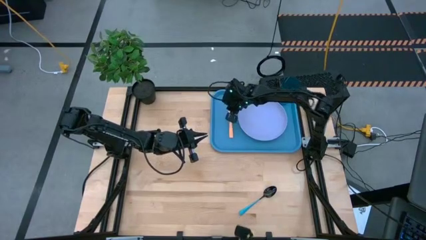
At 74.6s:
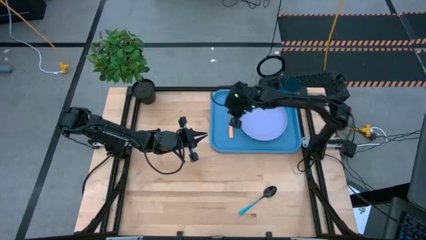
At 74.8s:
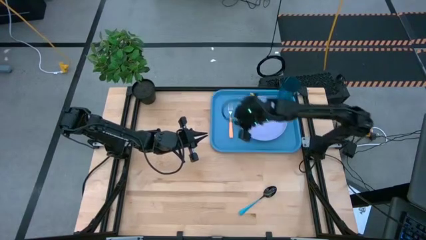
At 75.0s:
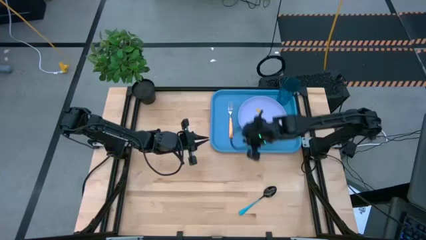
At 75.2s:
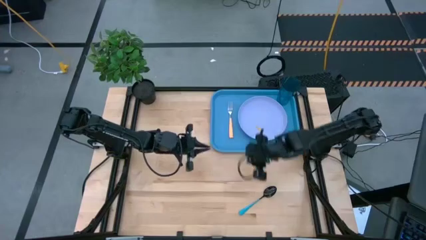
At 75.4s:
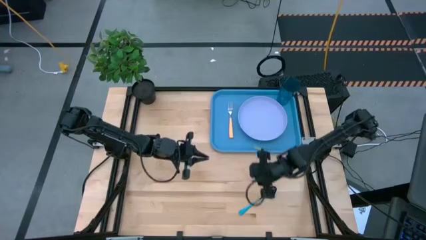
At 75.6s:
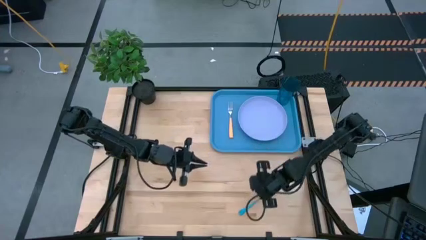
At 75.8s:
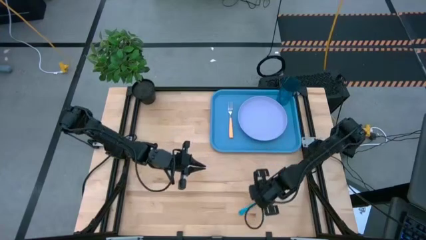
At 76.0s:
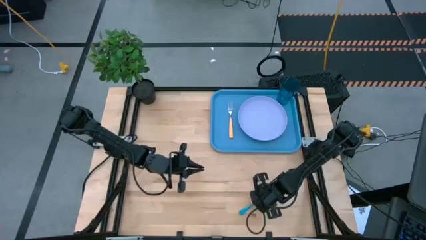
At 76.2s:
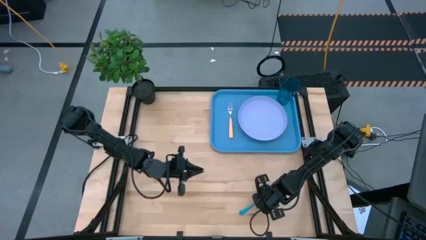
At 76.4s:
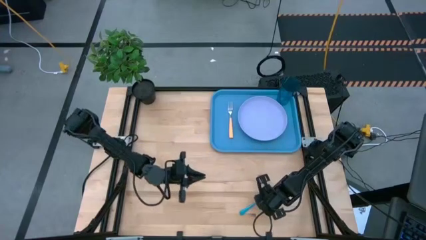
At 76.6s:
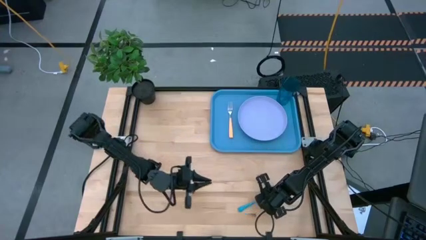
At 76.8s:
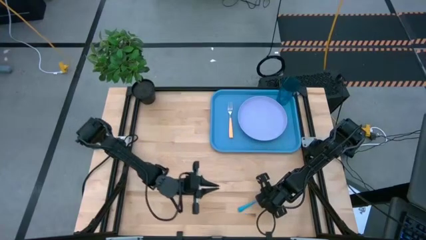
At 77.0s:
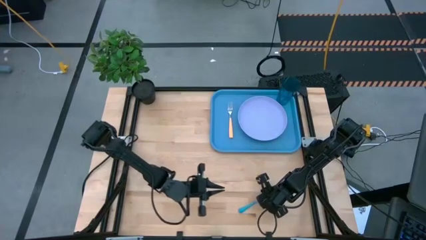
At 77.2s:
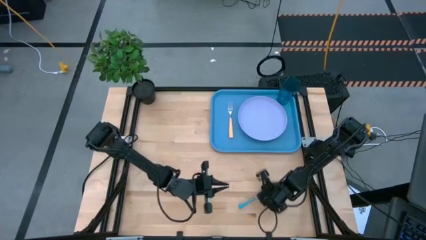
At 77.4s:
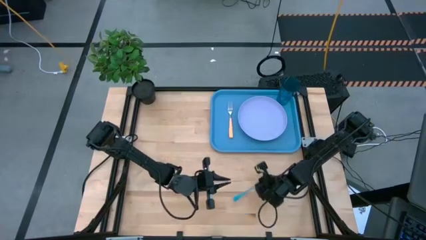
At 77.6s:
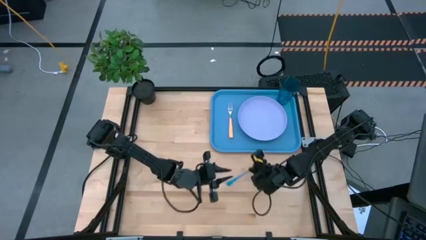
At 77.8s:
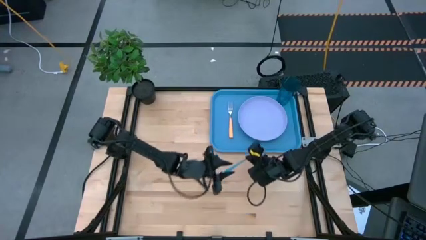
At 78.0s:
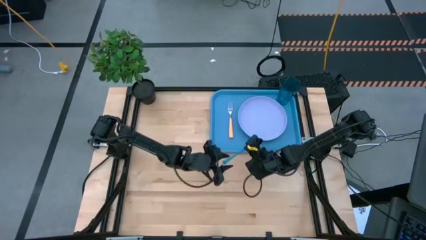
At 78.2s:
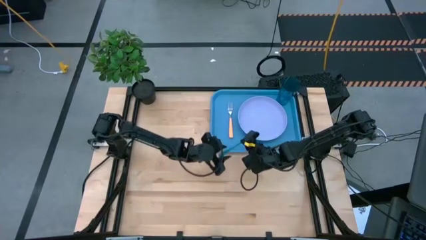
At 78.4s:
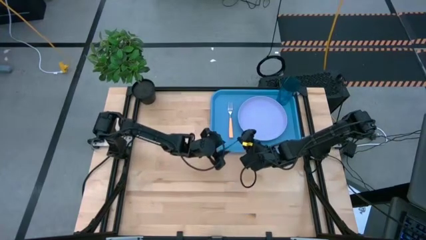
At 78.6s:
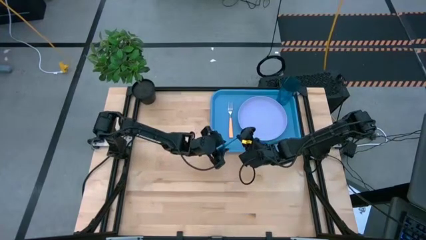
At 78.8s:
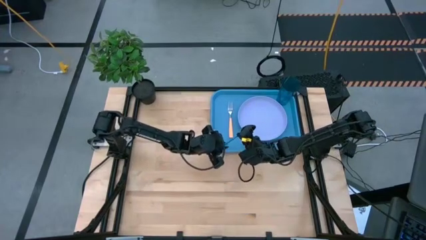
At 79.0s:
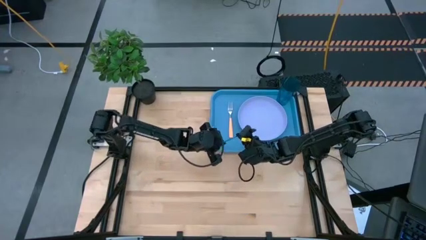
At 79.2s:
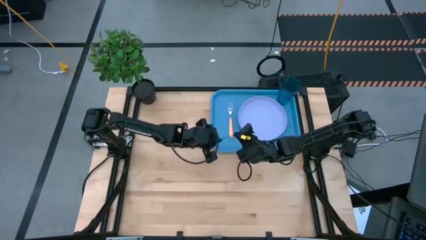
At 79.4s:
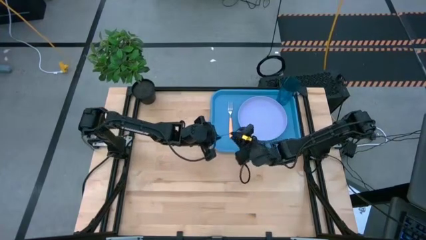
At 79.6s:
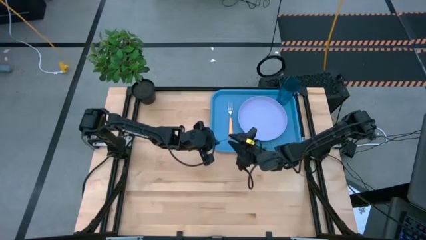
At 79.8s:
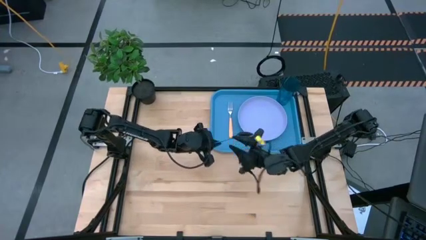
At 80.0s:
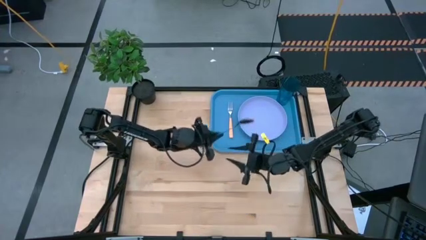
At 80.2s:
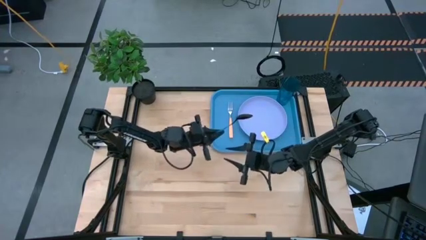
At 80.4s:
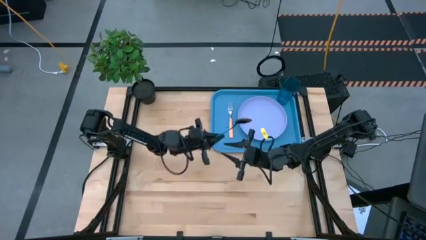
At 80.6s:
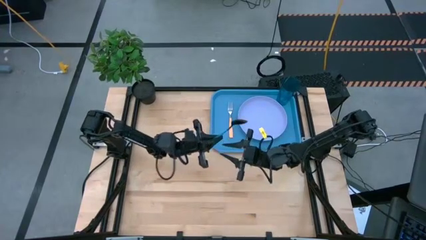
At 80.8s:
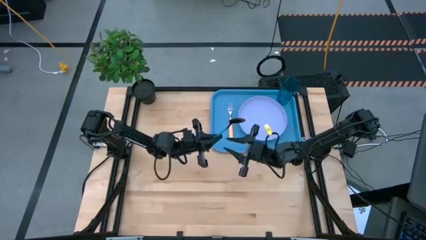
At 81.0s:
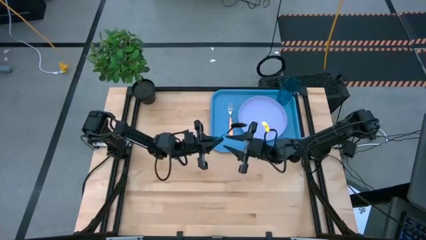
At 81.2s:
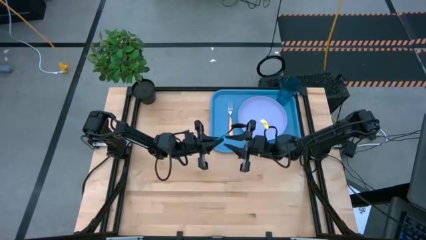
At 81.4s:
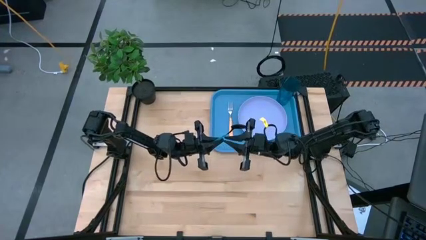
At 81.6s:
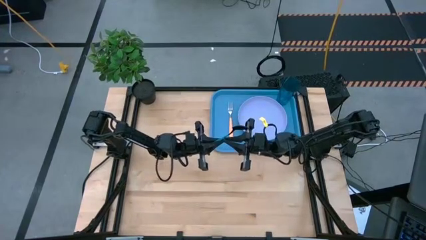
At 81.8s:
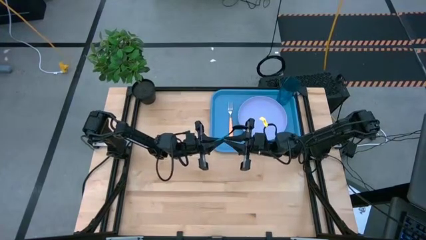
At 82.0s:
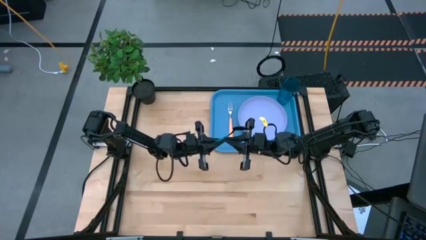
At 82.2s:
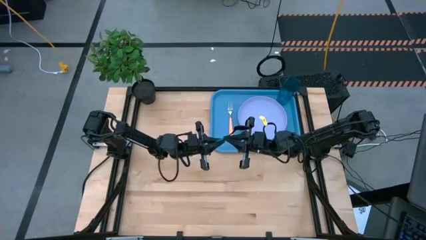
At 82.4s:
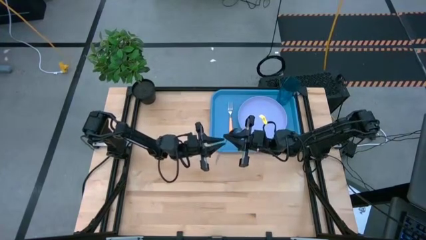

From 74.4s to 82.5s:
Task: Pick and place plate/cup/fork/spoon on tray
Put the blue spoon on the blue tray to the left of the light orange fork

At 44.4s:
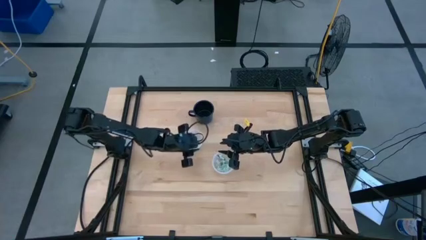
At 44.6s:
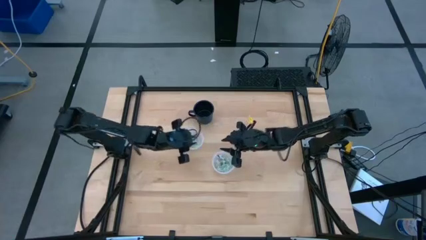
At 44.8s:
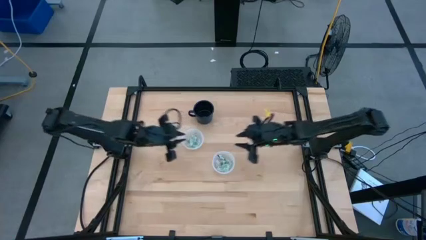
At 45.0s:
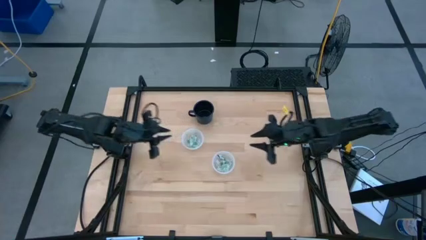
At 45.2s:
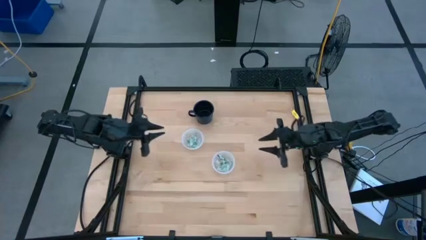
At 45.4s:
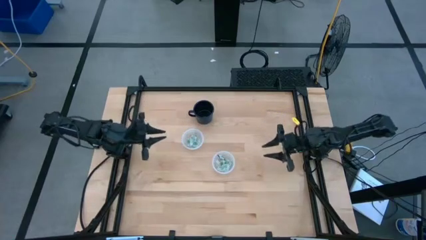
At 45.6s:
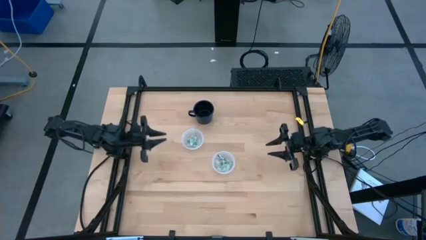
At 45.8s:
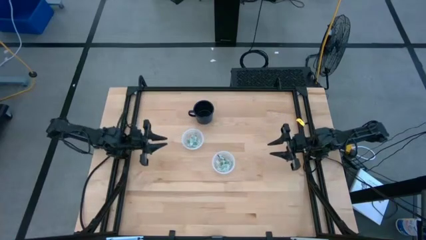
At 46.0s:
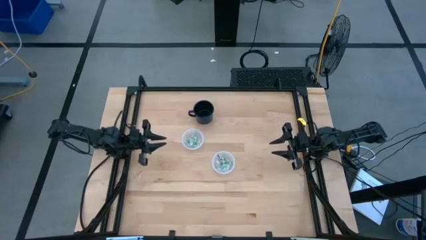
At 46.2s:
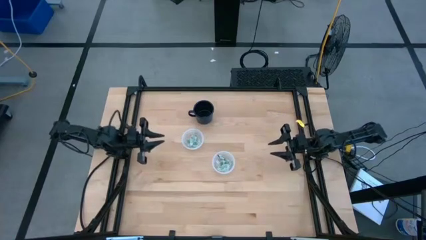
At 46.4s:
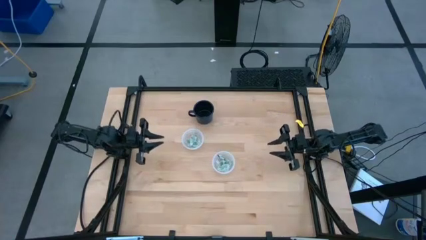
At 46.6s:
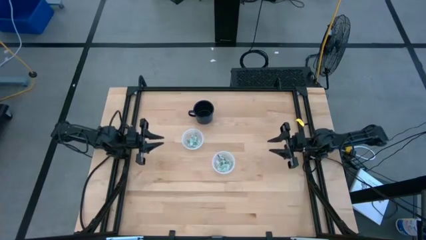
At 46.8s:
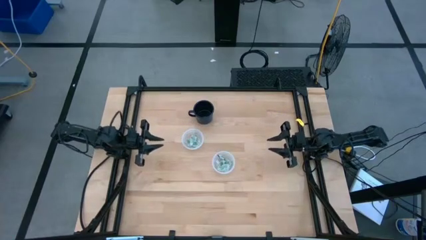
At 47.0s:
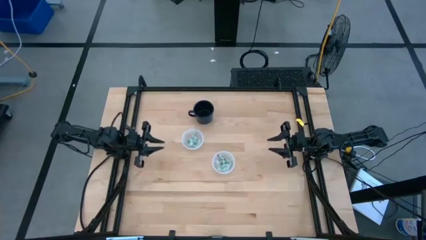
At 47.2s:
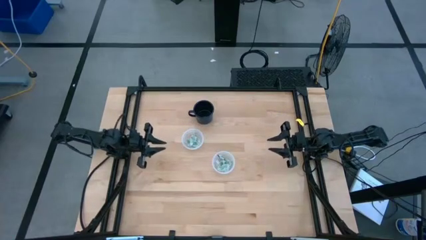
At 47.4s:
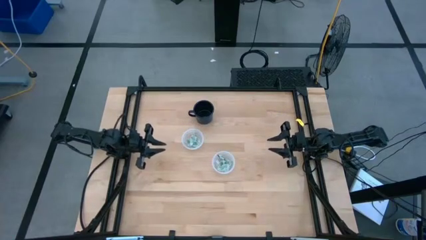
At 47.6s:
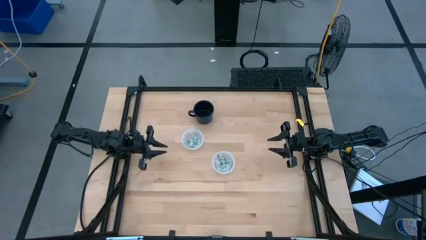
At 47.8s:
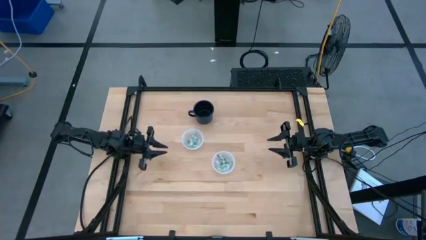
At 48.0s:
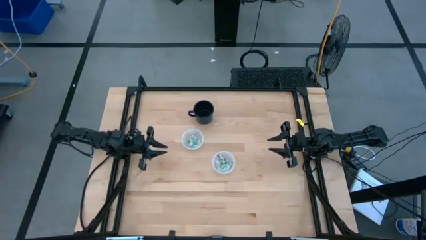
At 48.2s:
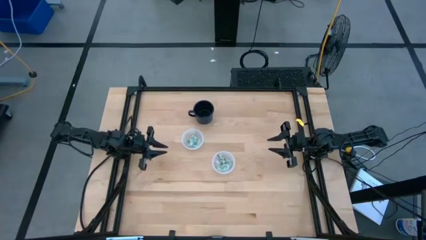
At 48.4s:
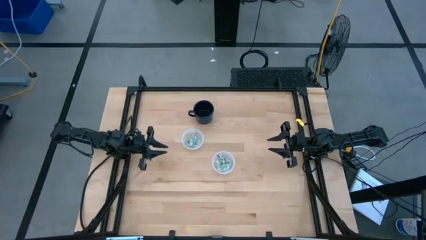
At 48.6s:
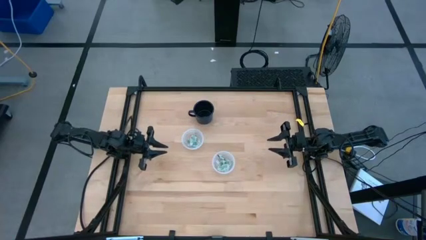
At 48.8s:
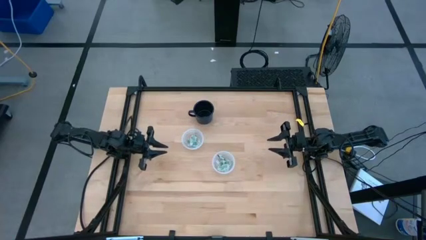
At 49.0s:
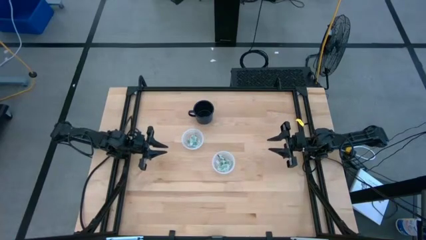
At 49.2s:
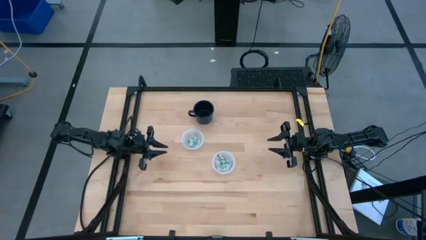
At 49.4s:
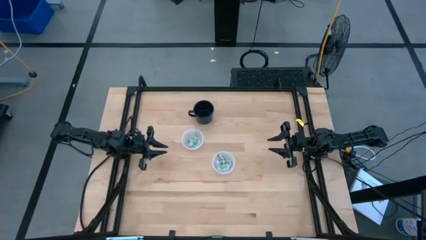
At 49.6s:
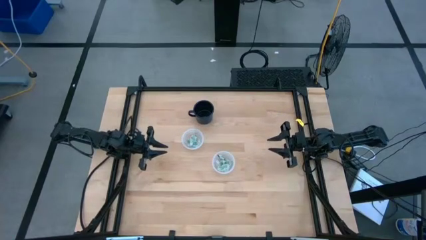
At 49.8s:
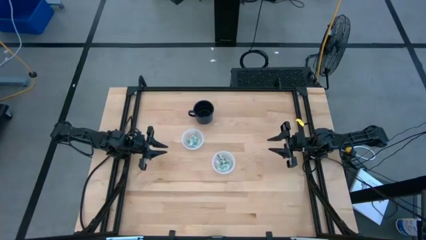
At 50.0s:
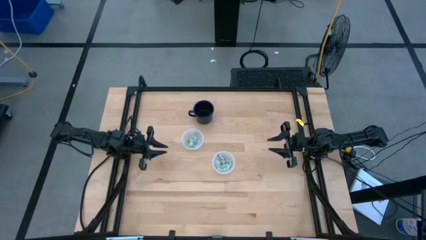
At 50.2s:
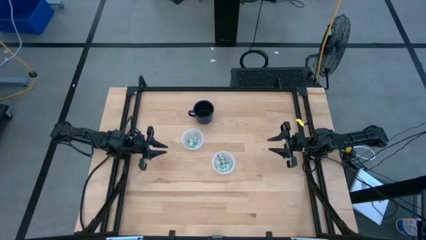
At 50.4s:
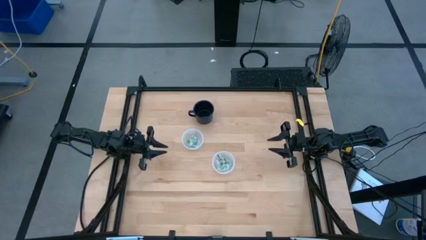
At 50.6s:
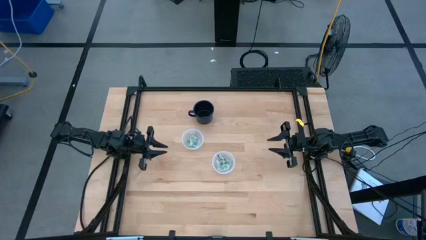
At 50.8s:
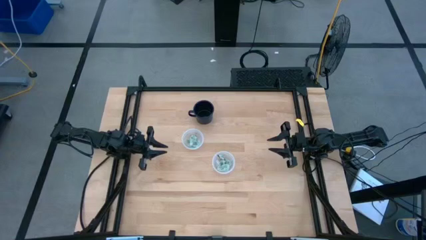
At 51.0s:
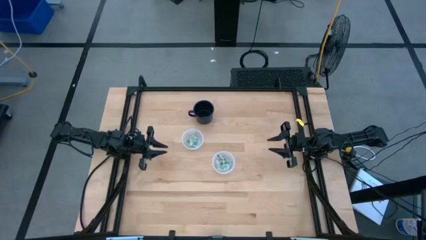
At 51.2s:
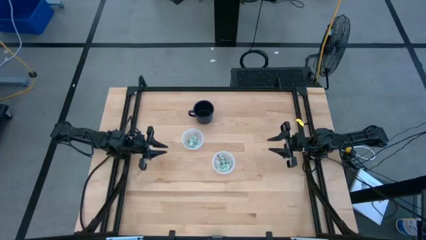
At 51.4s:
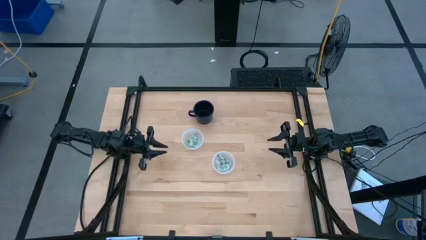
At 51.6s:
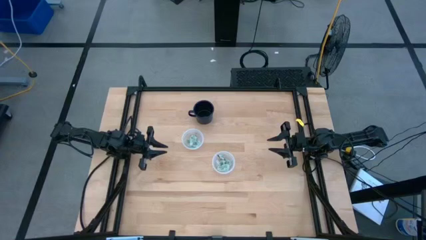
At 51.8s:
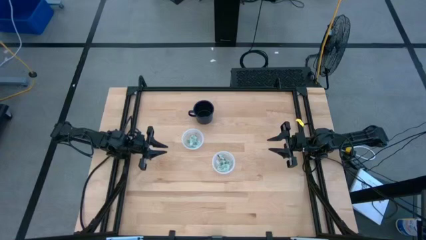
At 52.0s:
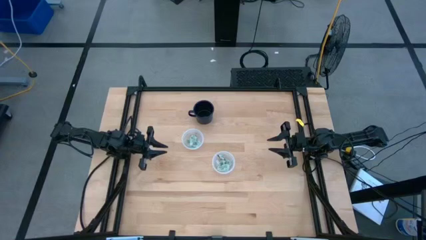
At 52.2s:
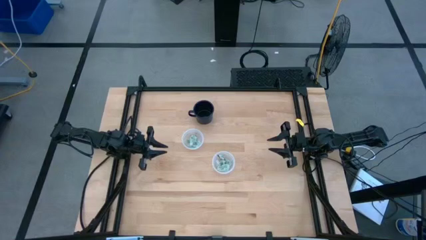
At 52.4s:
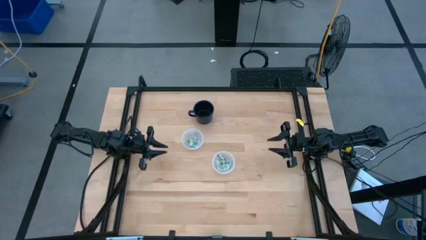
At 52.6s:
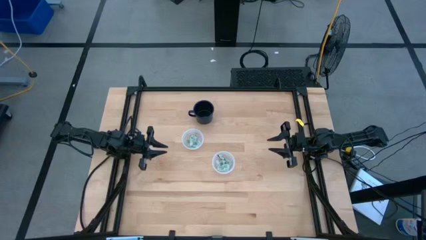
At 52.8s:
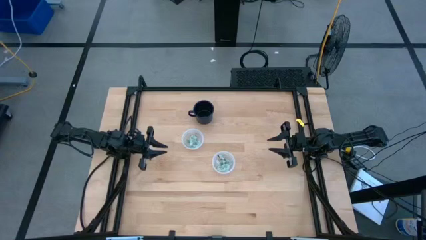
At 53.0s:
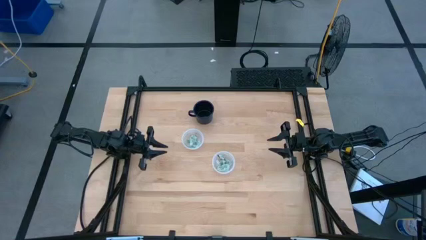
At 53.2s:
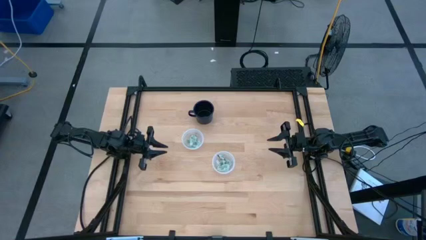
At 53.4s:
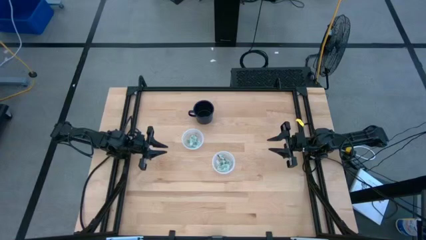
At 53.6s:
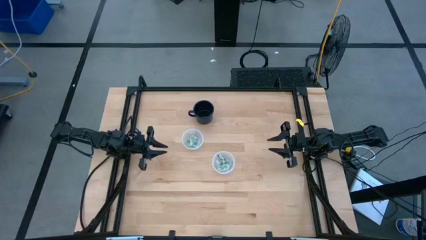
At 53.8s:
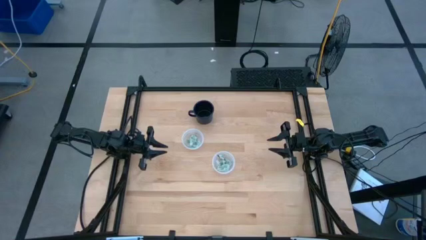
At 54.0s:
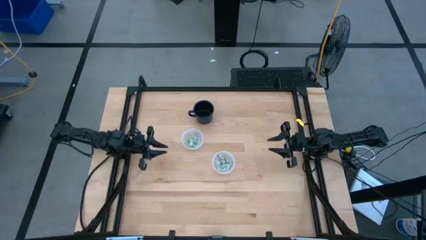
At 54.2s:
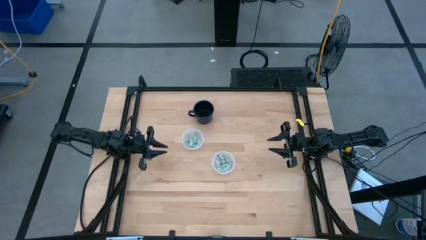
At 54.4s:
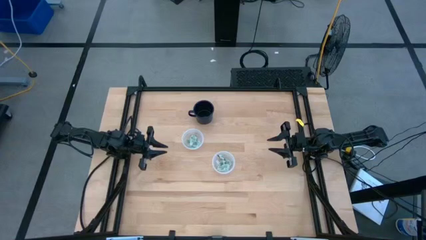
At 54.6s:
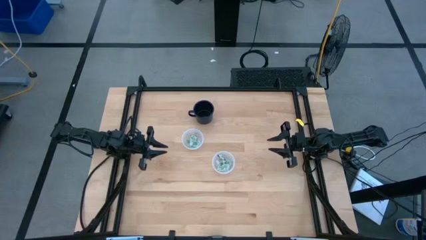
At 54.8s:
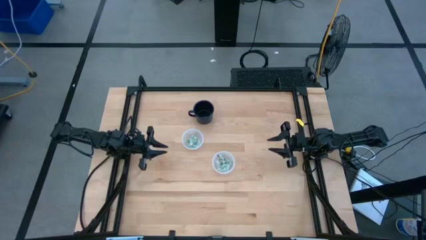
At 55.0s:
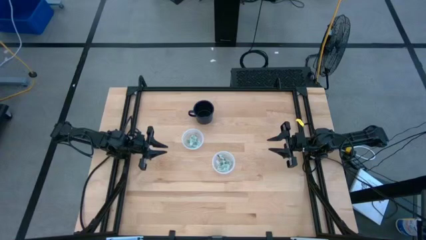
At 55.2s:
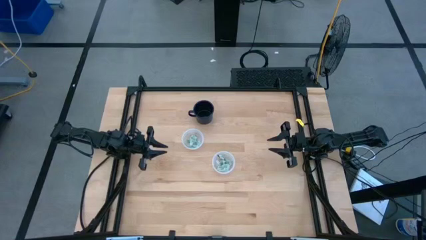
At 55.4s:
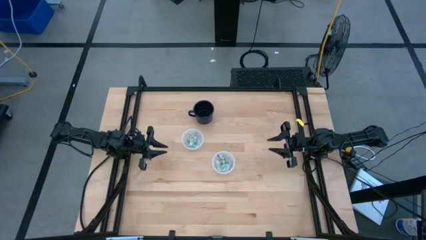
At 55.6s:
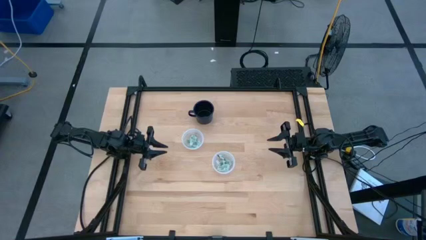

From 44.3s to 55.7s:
Task: Pick and place Stevia / Truvia into bins
Return to Home Position
